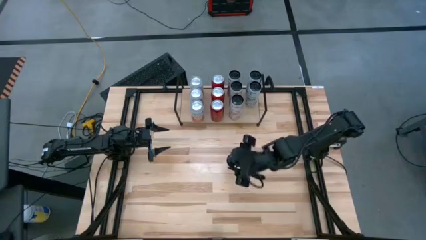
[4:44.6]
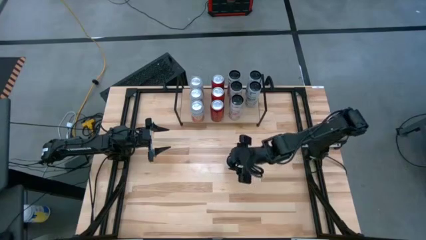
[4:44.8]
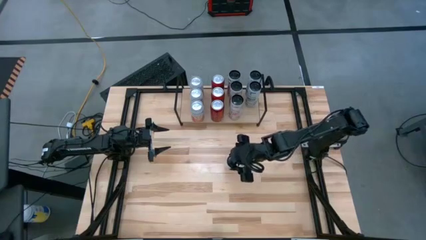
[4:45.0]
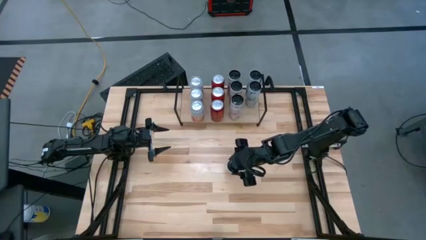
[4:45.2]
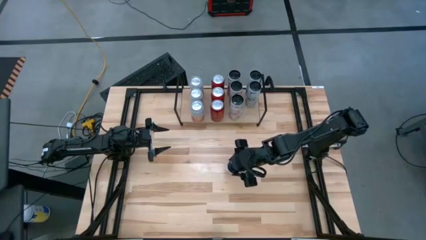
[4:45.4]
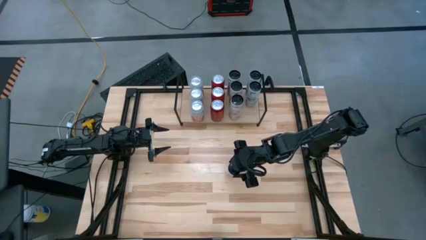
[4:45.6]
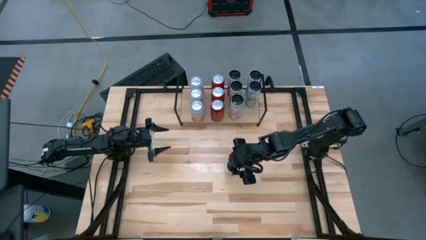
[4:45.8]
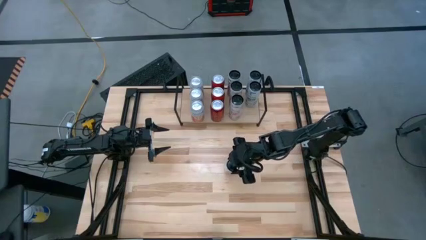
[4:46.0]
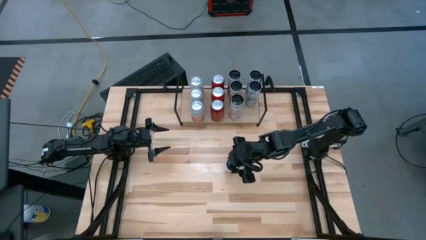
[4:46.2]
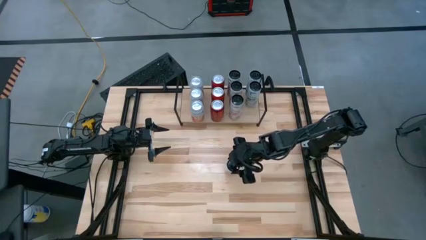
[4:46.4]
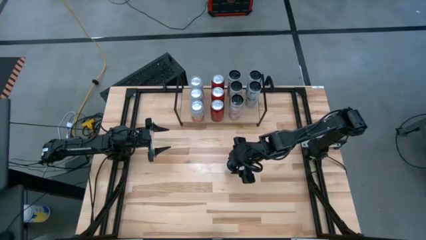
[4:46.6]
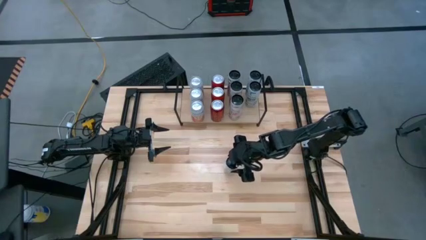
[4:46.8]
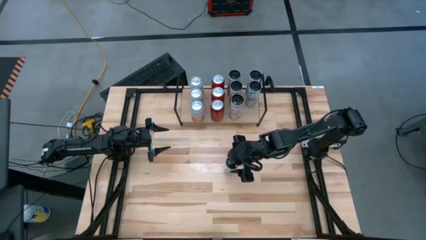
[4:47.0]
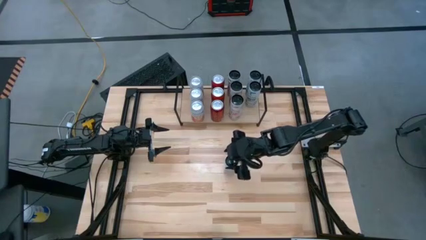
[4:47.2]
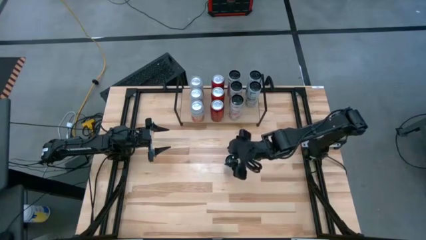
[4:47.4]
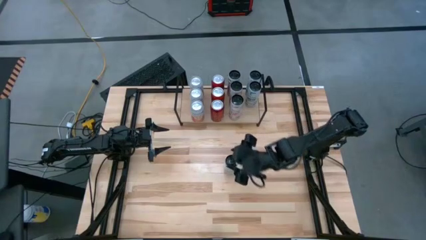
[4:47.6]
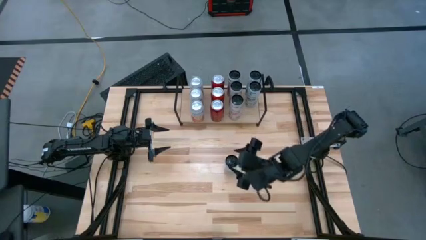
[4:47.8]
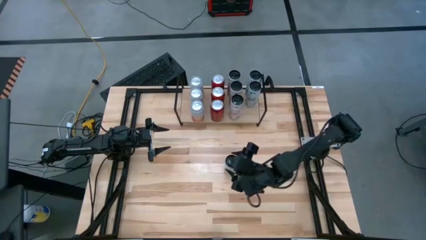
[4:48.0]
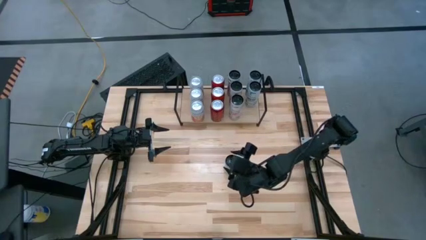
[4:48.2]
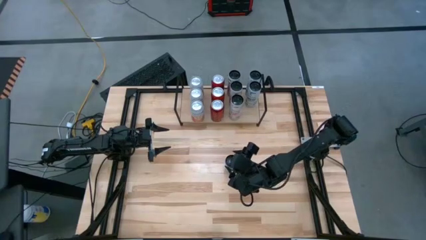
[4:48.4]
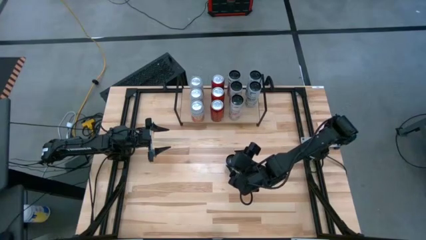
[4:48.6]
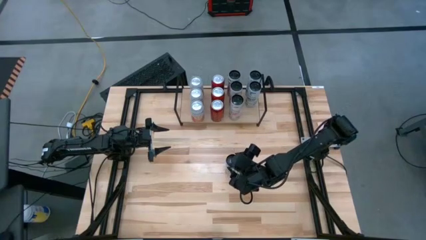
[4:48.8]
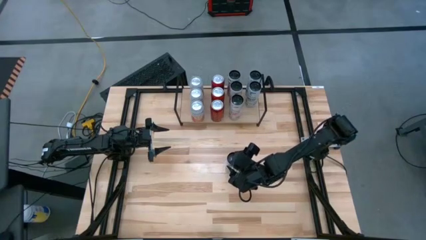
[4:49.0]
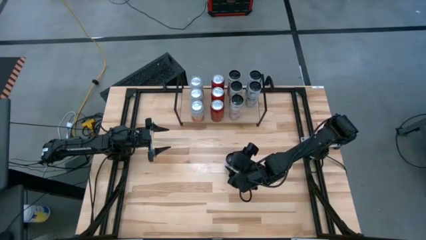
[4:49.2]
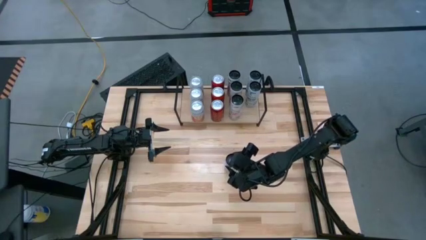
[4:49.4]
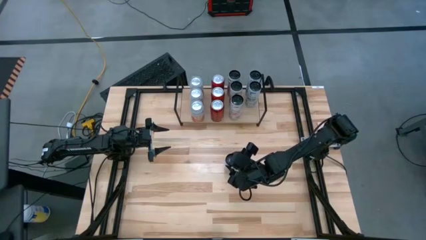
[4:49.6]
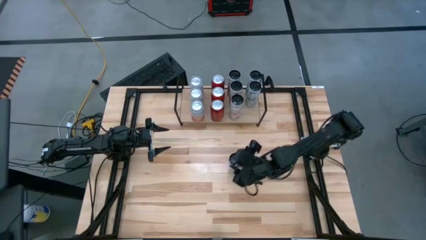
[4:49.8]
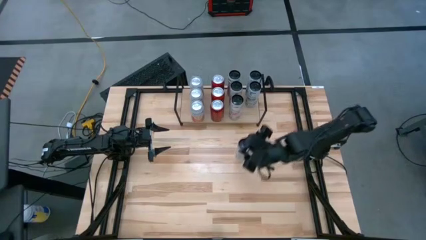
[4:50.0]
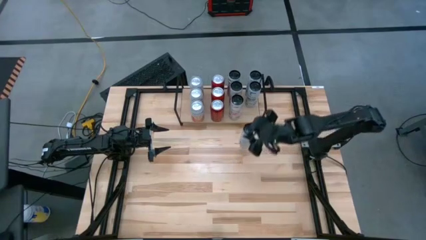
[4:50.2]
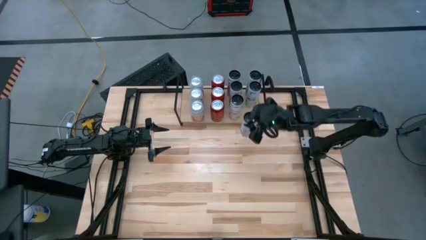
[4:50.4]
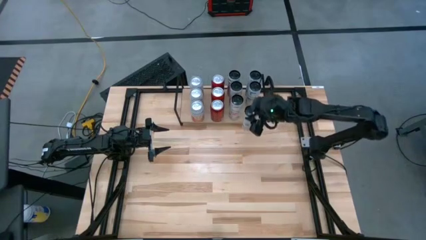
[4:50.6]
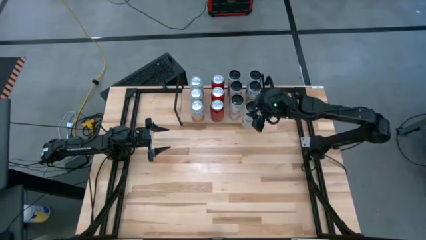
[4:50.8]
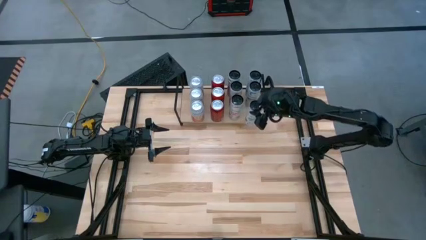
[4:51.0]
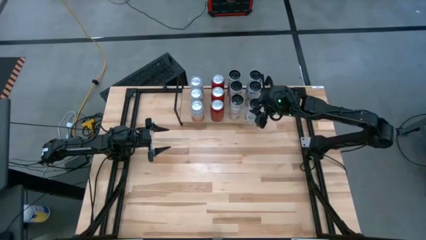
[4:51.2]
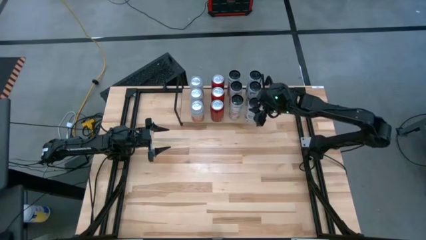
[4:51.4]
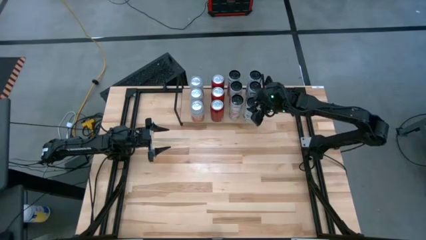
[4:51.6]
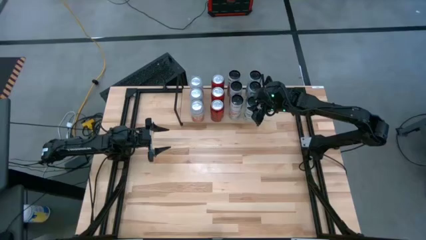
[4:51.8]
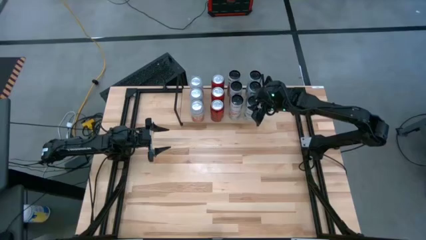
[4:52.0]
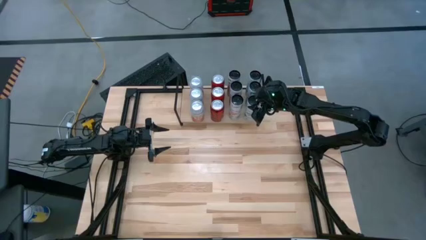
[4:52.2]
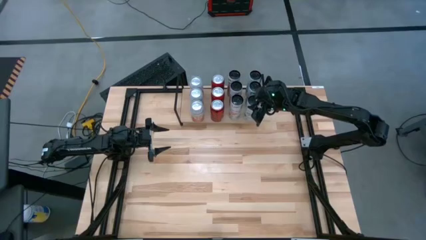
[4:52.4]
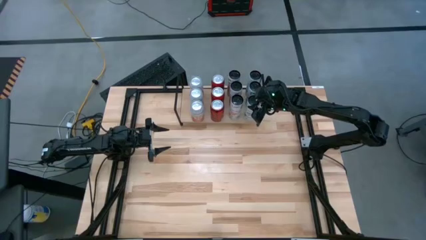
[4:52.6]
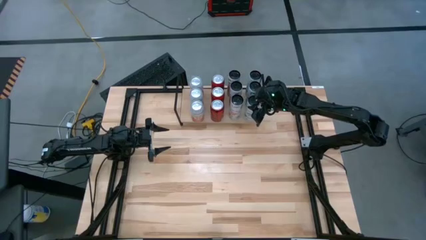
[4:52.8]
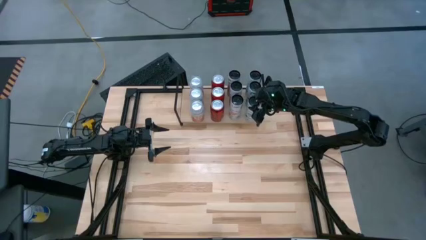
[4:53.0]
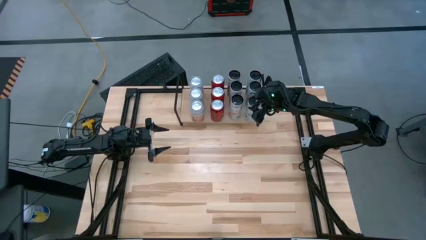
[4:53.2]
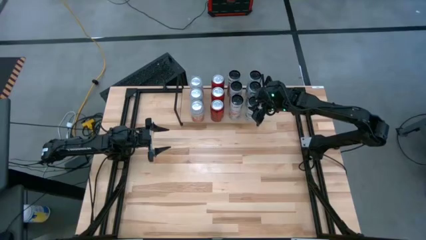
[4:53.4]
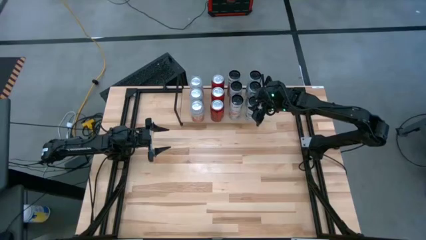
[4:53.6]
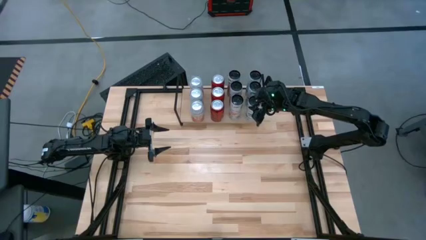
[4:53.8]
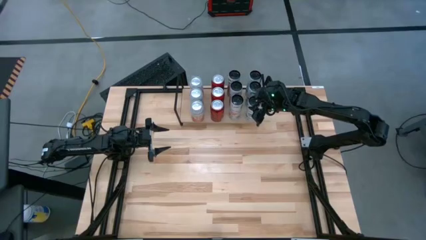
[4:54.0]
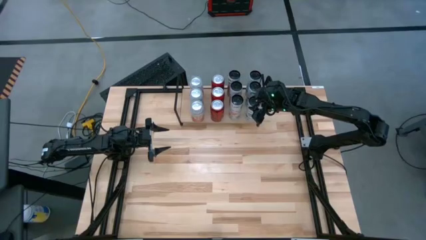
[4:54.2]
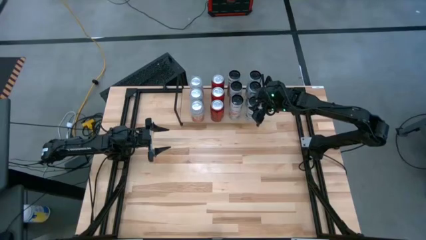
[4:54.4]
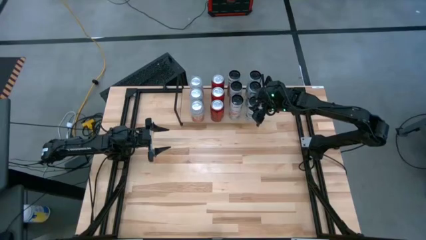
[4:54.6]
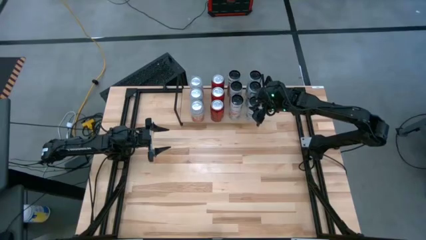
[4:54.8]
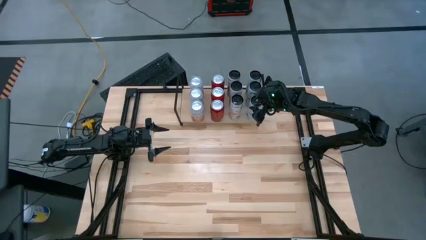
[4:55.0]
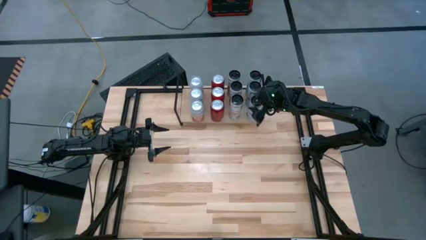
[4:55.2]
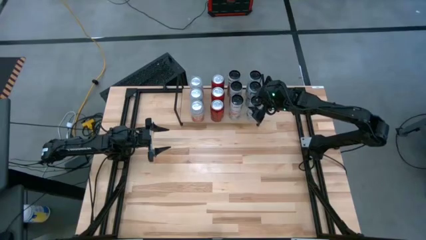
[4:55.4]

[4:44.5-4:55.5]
Task: Place canned beverage on shelf
Put the white blue soda can on the shelf aligned with the other white blue soda cans

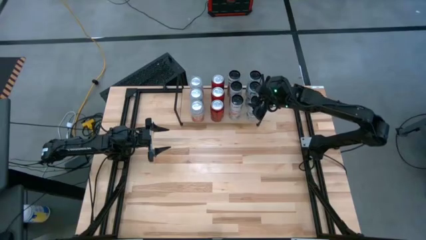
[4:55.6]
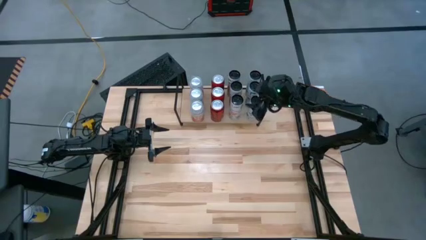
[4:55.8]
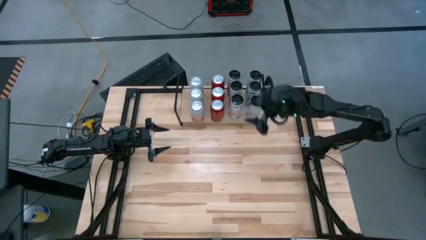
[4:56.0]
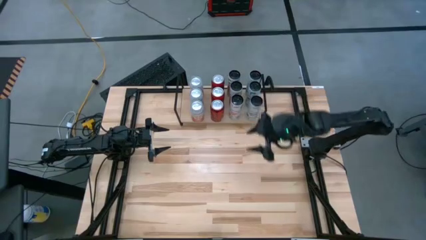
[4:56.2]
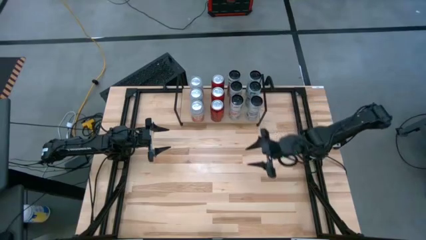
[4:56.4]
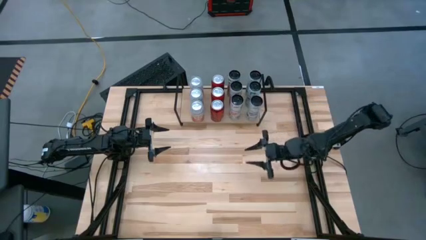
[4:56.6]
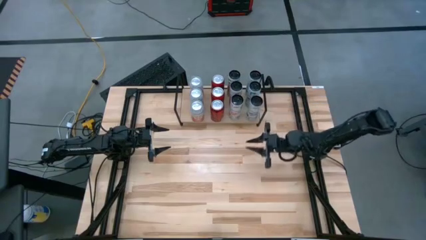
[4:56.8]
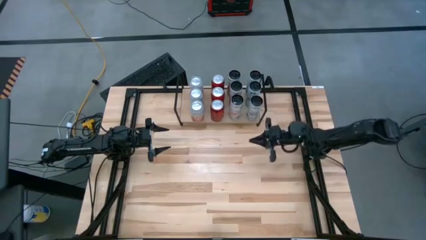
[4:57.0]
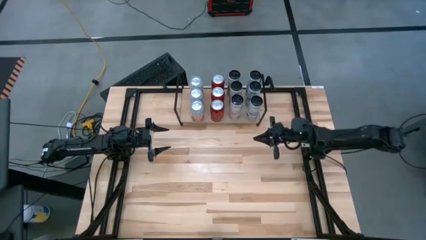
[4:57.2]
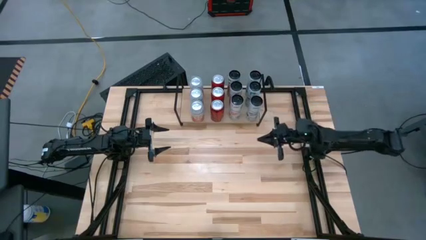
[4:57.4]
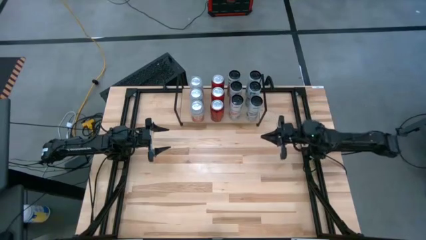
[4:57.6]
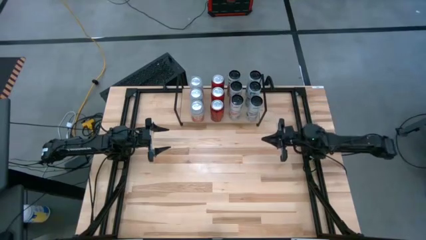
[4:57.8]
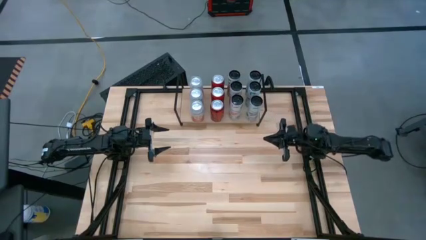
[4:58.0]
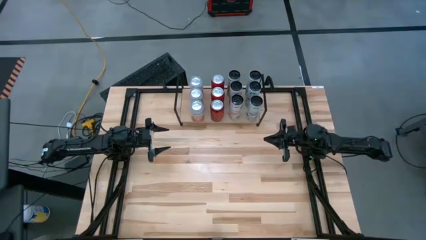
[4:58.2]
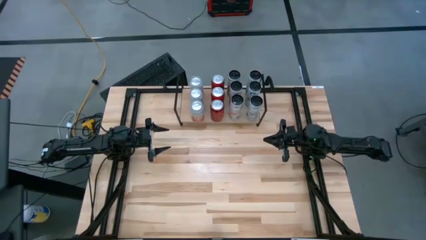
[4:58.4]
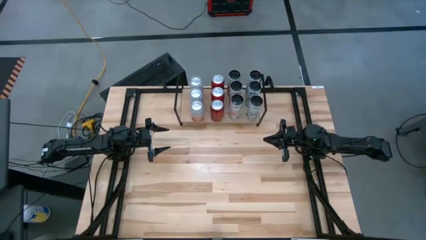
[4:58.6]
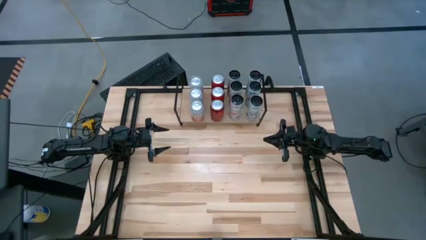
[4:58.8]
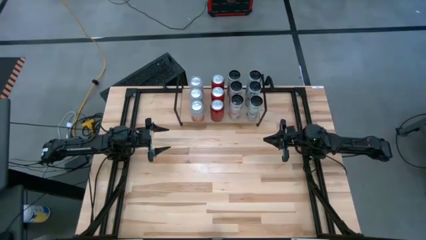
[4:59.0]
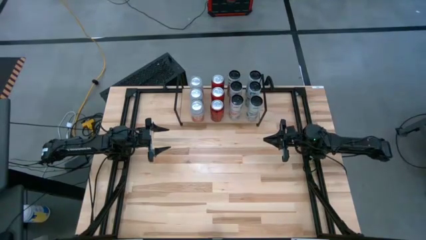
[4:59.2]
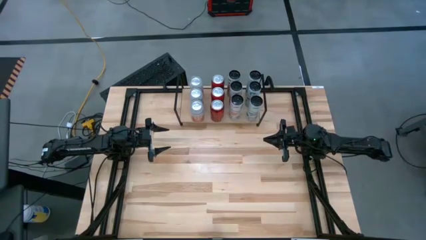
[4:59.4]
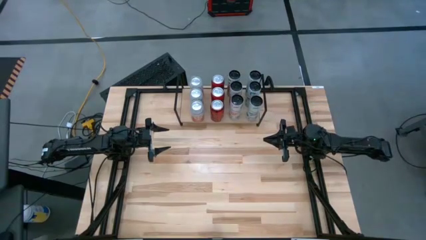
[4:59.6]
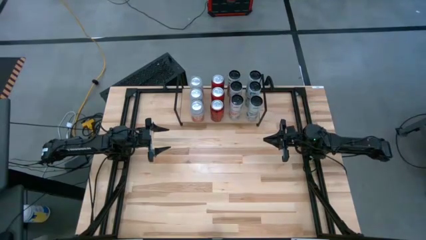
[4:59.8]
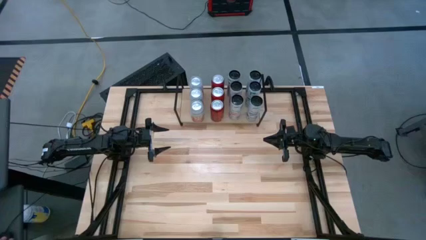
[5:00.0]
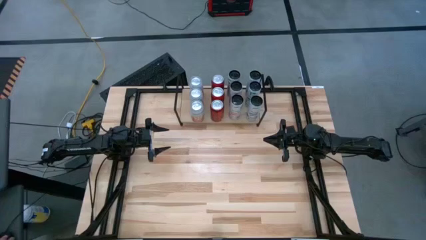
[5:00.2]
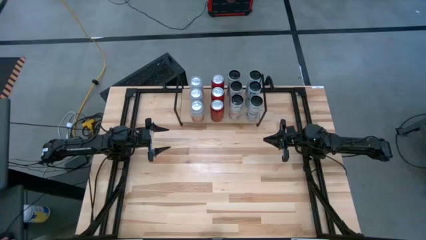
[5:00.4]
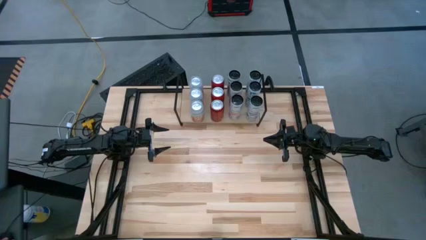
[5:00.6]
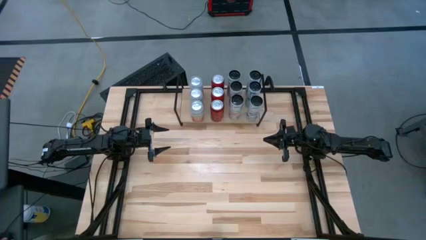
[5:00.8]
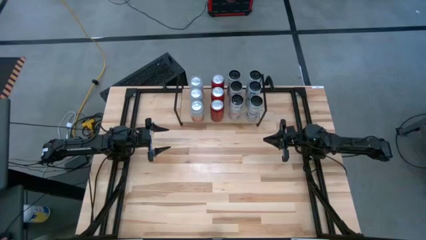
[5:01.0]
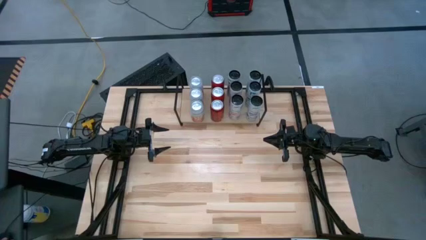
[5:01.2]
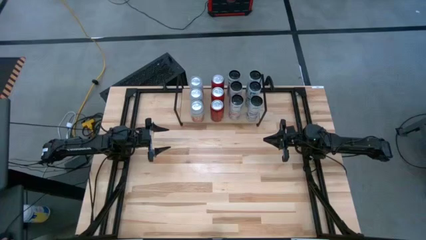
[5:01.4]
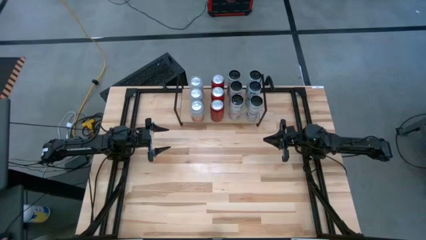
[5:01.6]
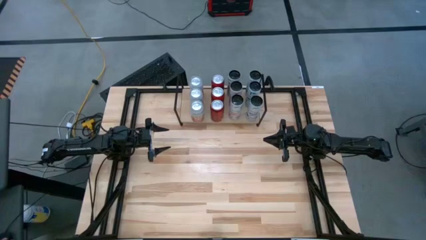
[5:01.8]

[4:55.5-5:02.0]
Return to Home Position
